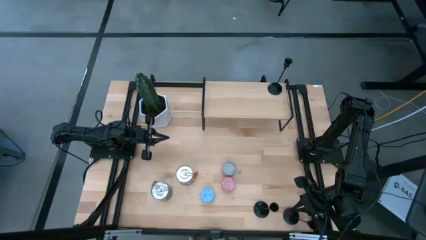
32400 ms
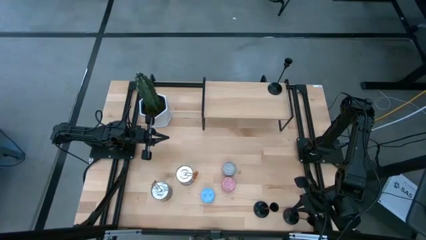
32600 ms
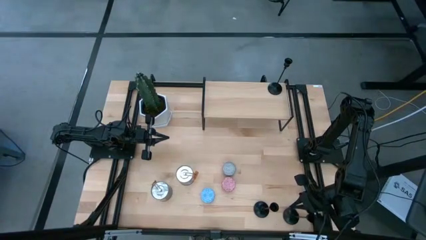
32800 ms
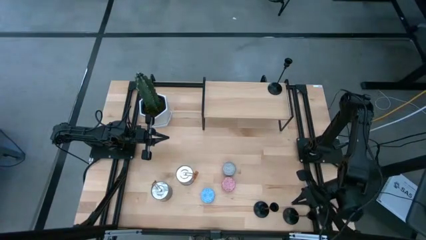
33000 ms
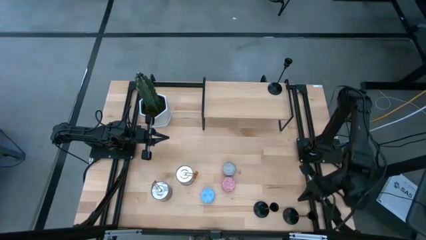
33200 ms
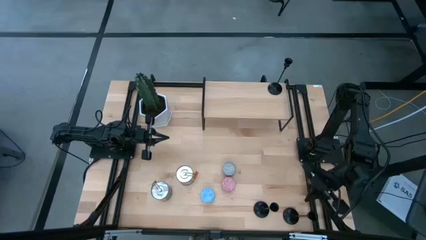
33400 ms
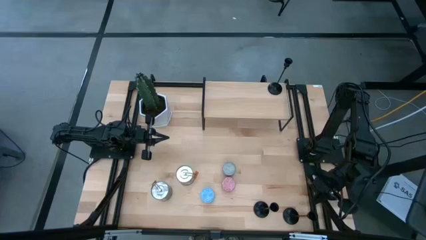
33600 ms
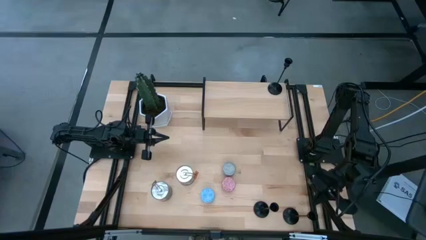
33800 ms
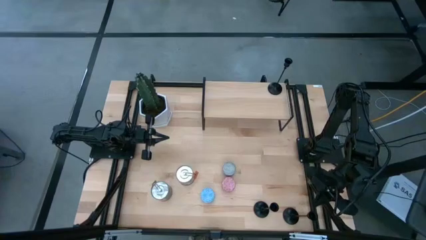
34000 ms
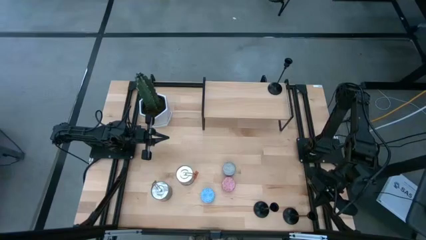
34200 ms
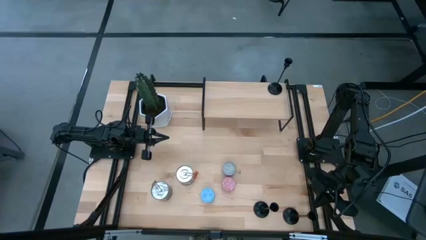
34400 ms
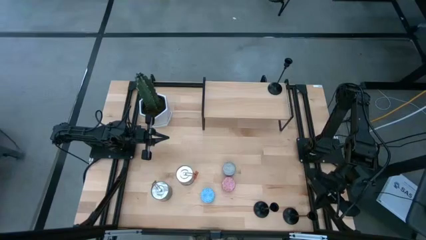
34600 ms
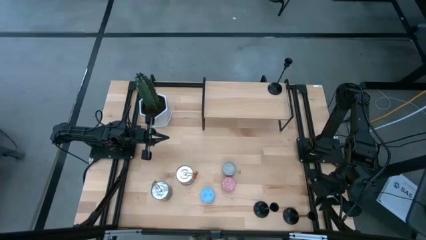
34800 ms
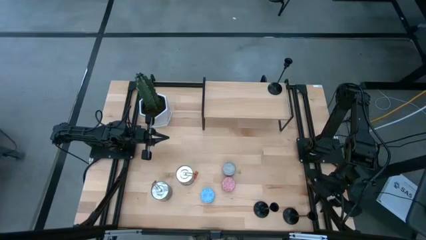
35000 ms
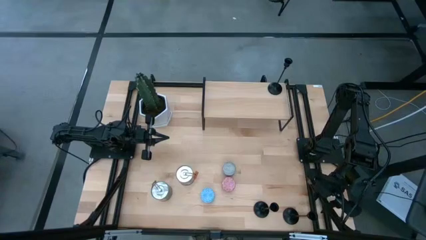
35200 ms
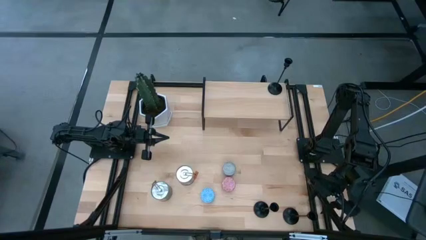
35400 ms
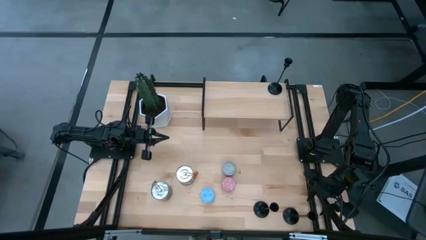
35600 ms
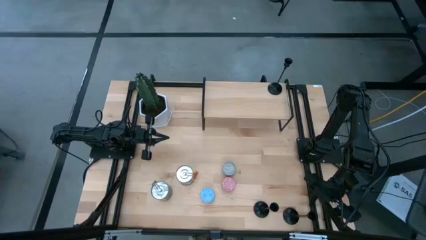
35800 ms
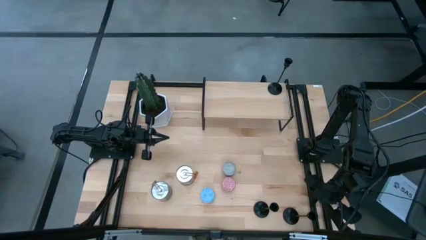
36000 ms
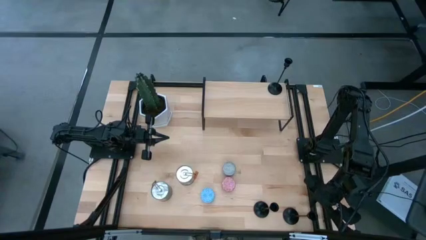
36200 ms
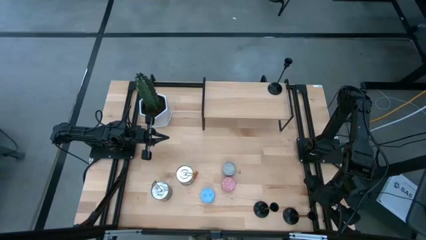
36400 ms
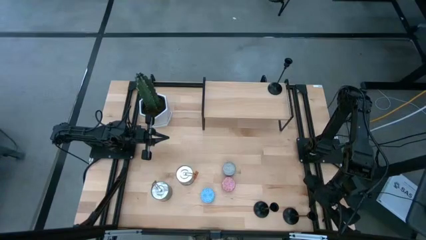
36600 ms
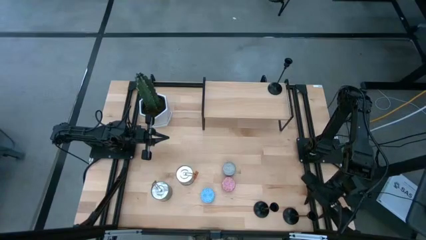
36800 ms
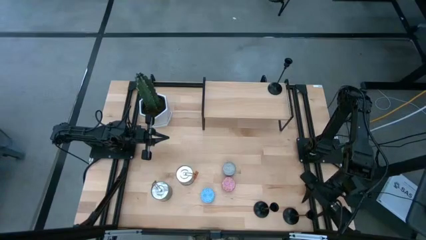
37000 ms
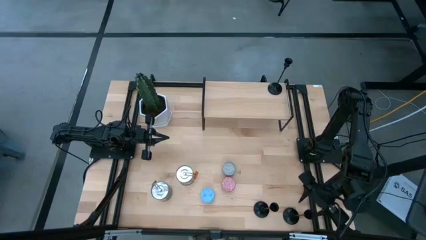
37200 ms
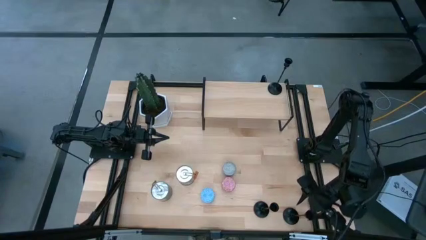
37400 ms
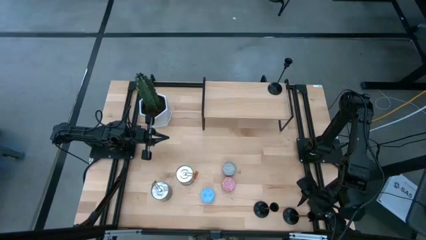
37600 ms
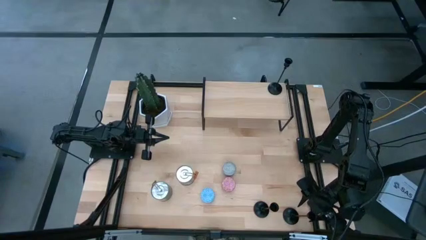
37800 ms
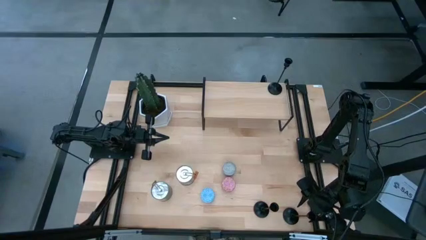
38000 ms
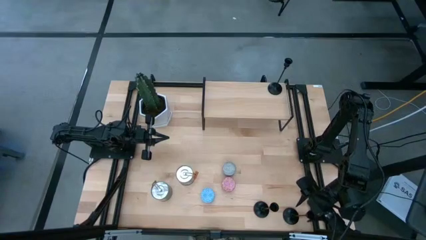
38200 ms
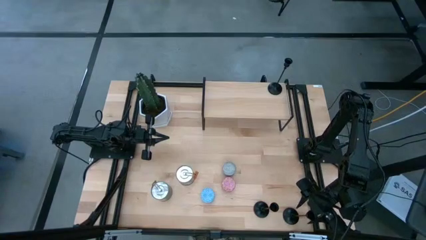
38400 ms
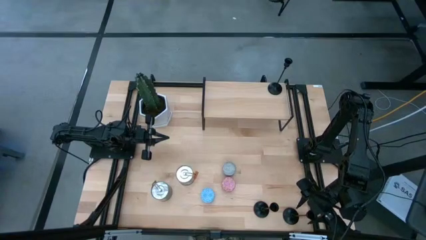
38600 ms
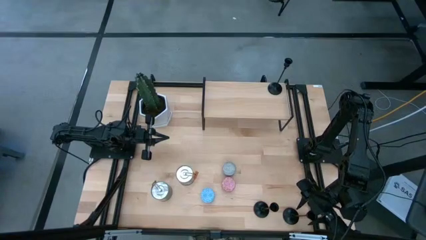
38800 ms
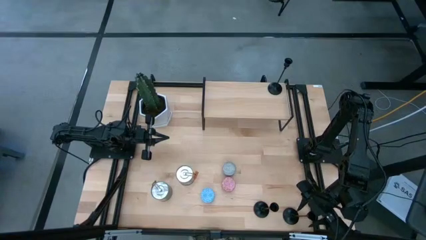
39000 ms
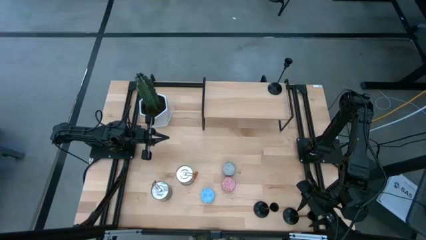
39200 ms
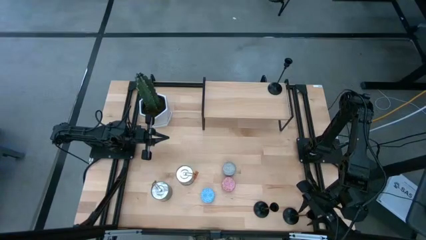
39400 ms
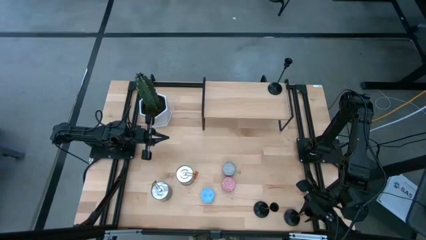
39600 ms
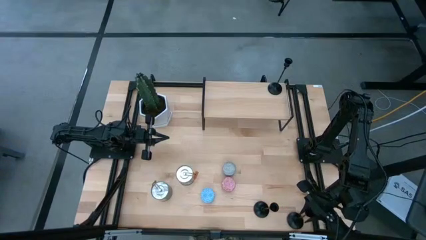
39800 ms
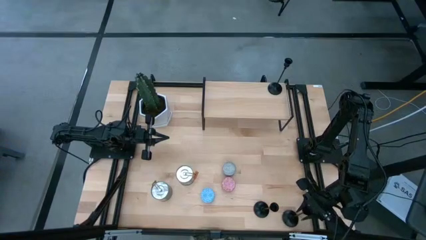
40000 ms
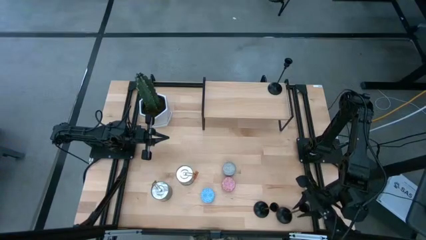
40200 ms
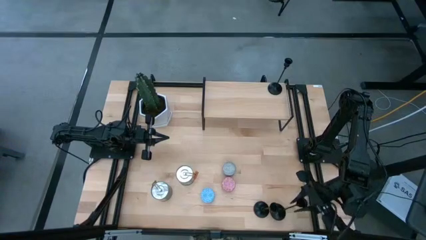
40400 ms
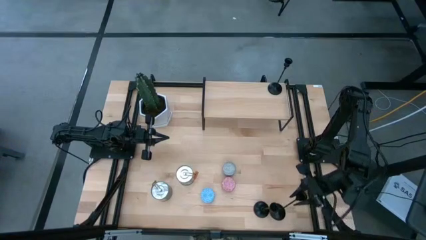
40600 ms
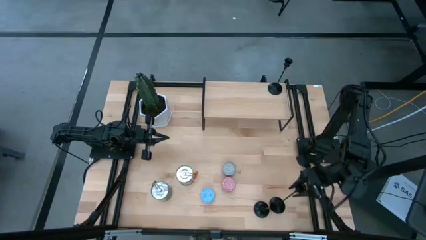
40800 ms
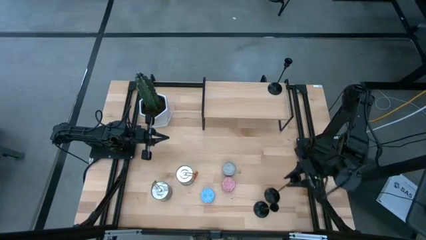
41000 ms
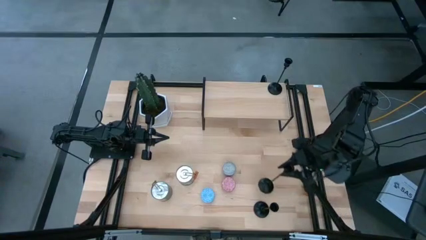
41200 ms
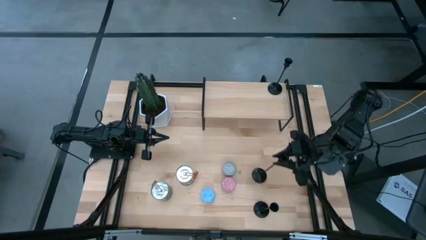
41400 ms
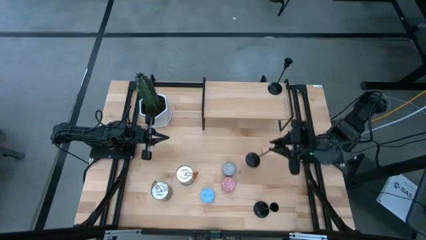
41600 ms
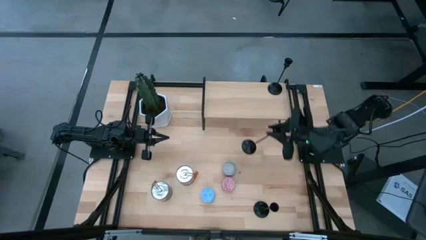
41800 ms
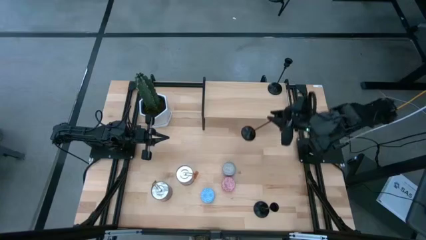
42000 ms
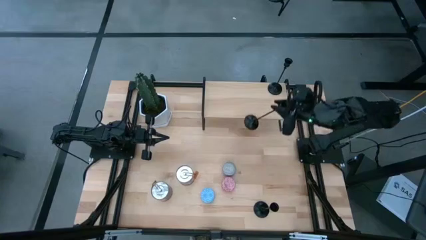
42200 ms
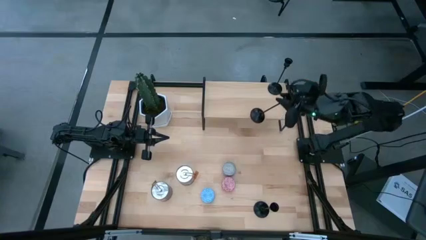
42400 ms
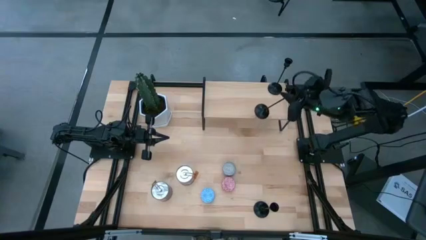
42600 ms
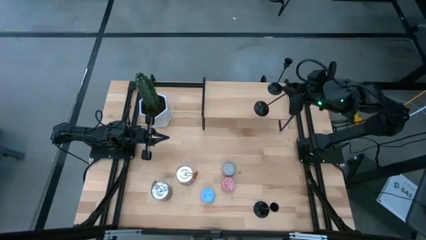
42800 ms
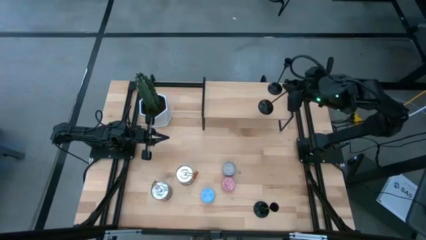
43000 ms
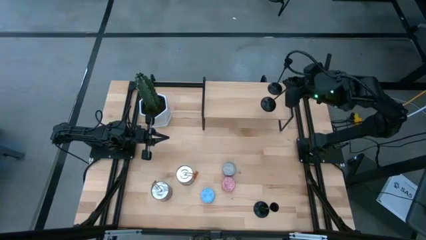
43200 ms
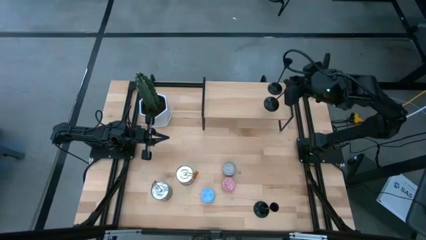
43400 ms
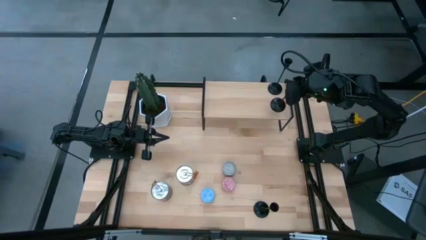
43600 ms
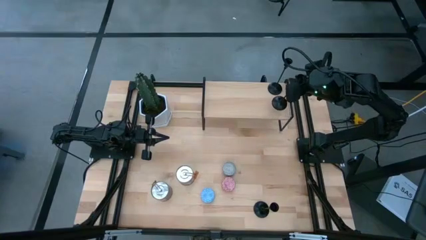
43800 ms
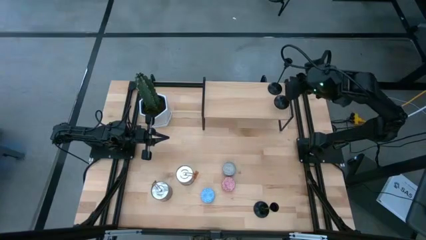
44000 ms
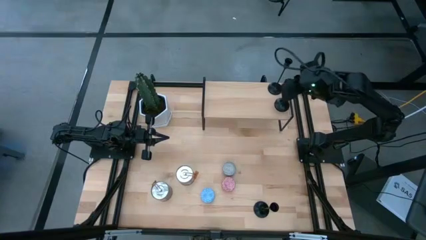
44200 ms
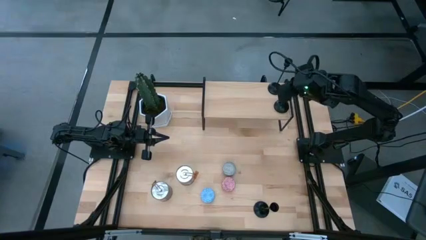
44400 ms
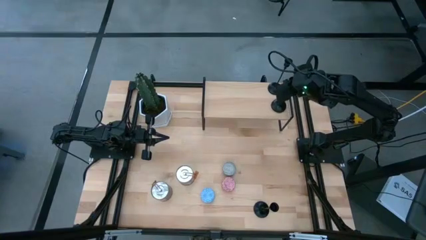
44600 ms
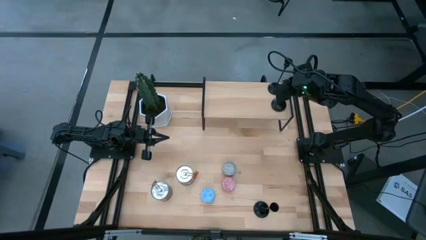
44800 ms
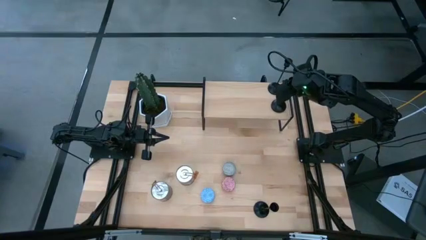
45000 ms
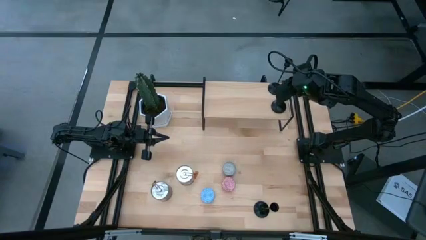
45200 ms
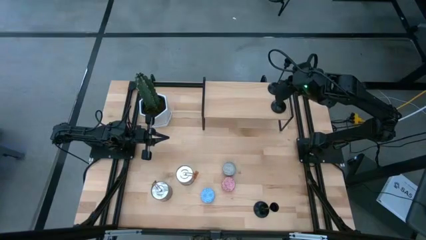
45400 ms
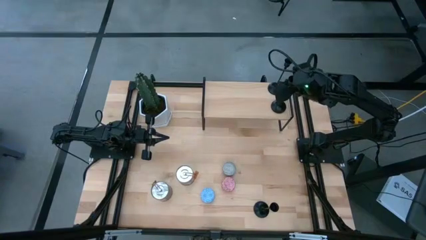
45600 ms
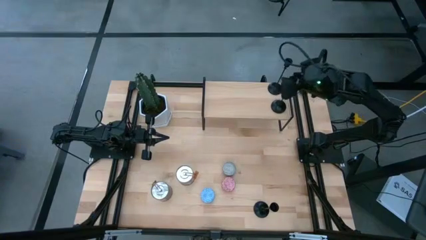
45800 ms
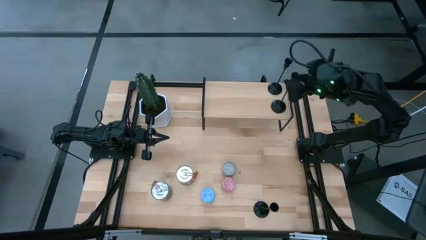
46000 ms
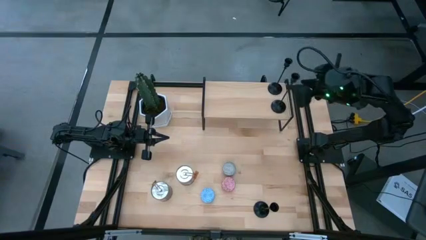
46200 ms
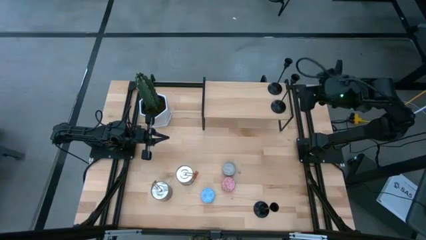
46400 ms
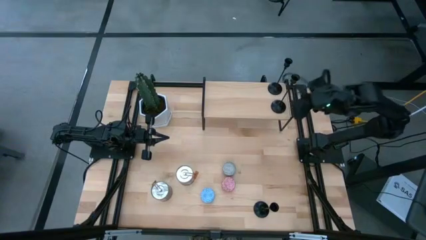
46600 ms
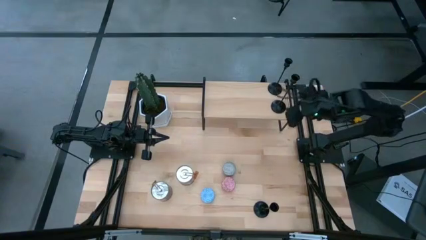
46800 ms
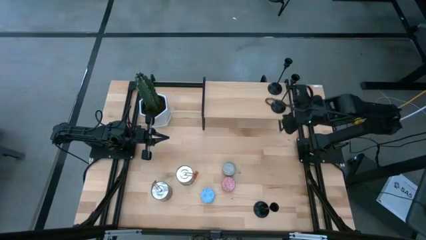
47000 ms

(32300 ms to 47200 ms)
Task: Pick & Place candle stick holders
Put the right black candle holder on the shelf

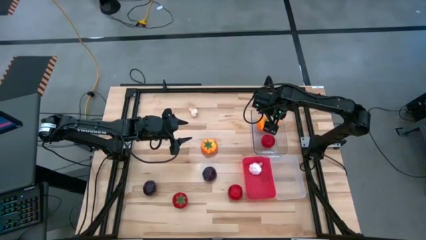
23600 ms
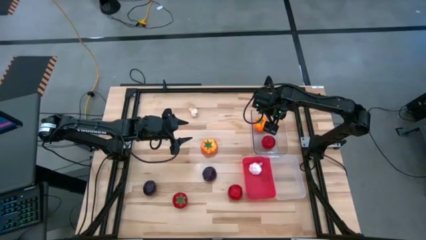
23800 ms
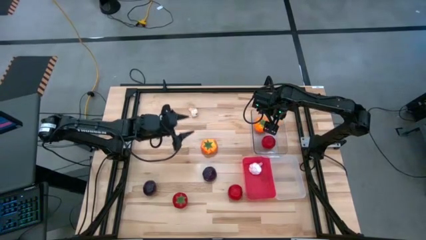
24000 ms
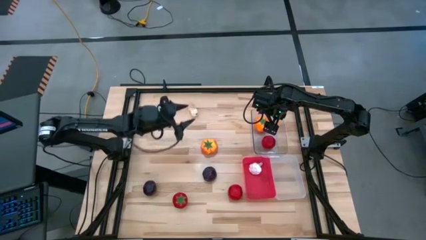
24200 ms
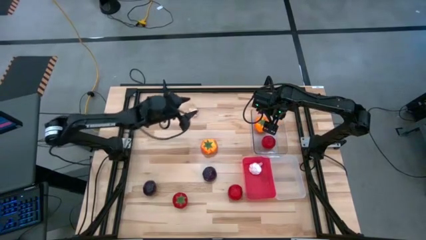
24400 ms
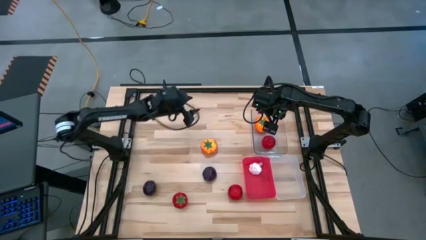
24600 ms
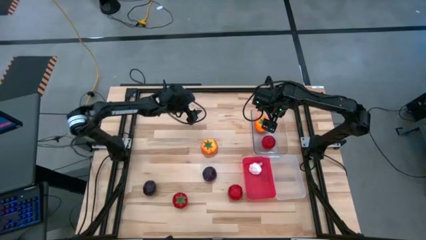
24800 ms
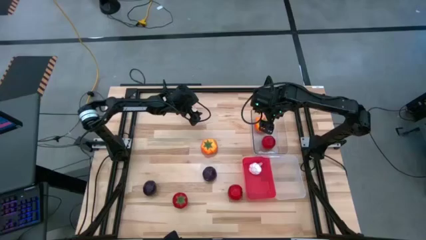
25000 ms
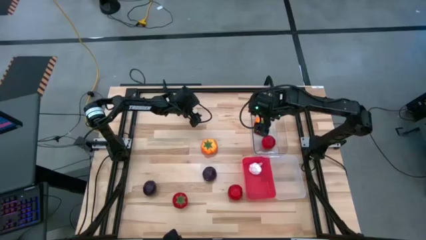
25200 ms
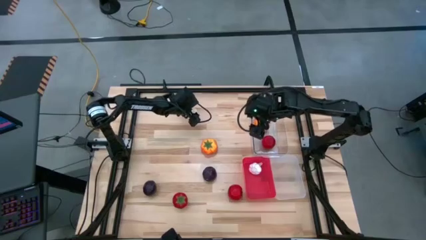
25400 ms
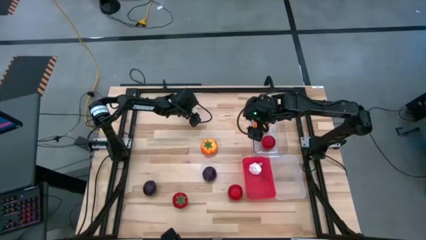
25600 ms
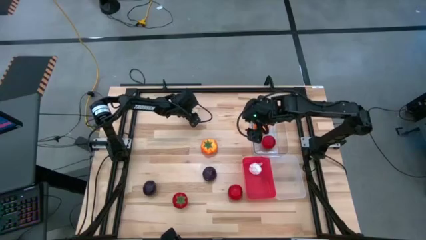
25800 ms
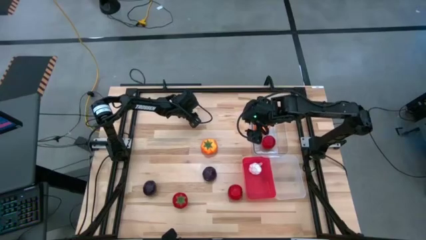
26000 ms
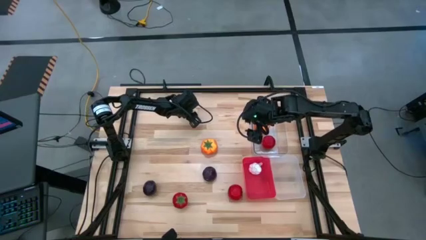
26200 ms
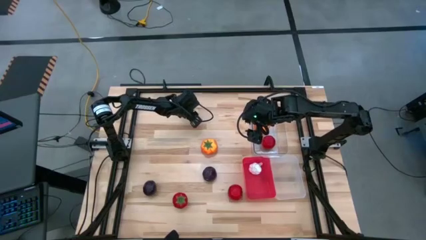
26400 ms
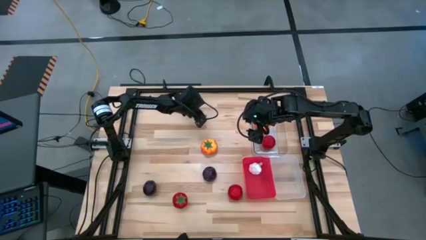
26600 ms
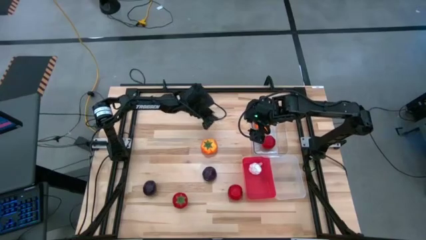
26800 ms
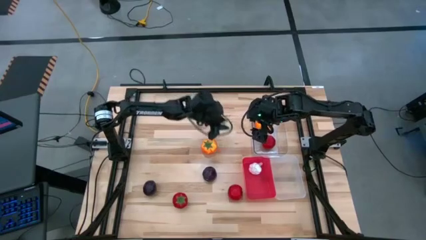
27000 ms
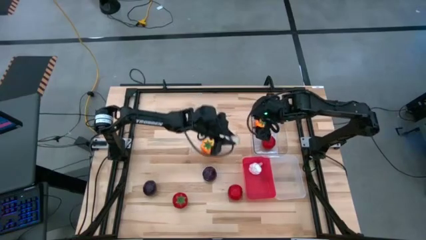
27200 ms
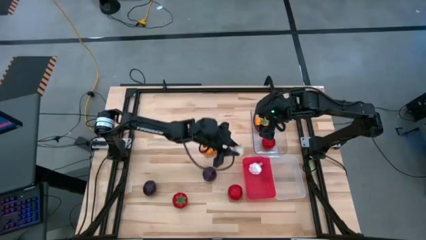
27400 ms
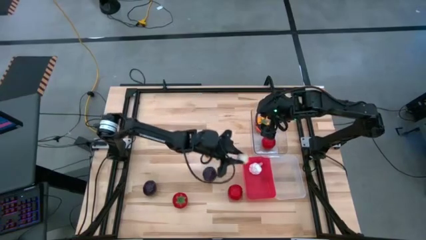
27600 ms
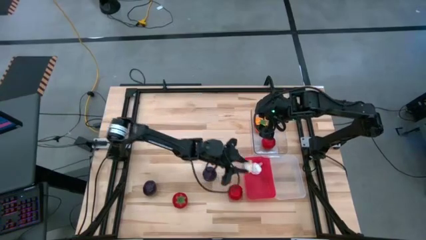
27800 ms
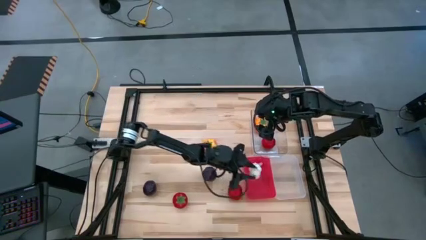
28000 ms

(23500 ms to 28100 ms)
Task: Sort produce into baskets
Put the garlic into the red bin
